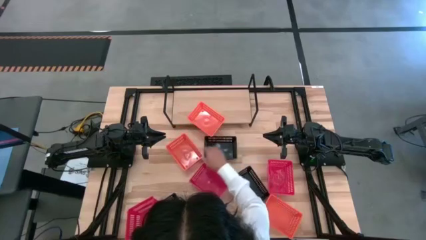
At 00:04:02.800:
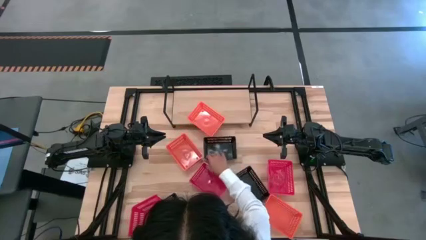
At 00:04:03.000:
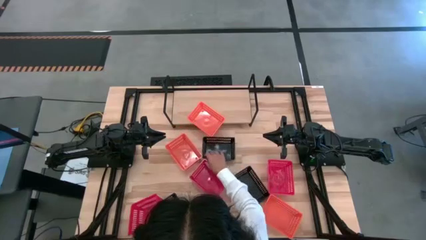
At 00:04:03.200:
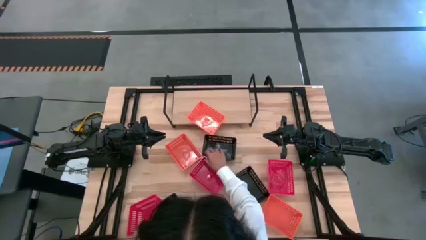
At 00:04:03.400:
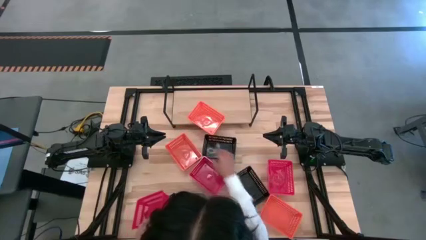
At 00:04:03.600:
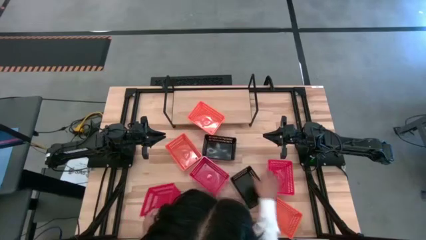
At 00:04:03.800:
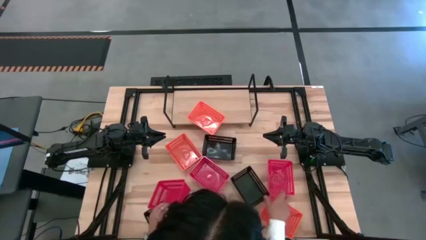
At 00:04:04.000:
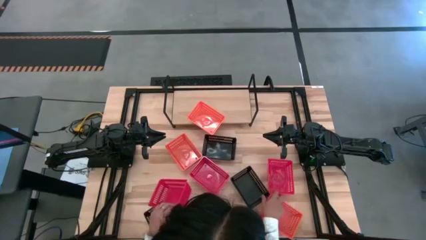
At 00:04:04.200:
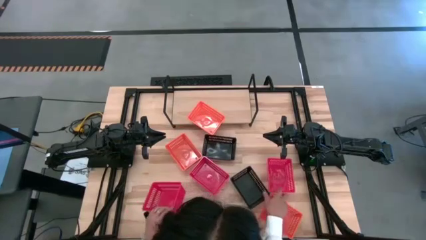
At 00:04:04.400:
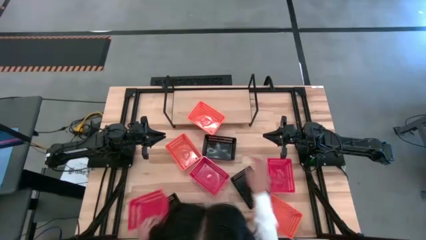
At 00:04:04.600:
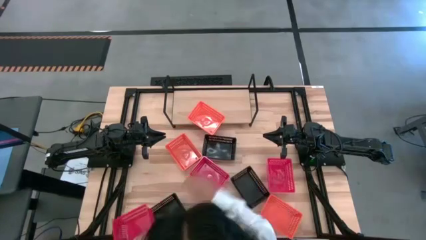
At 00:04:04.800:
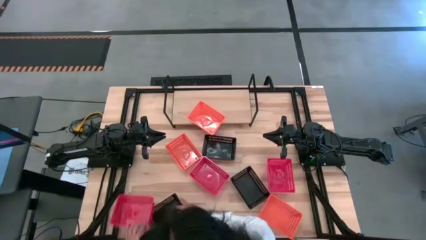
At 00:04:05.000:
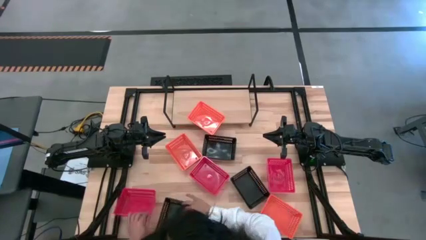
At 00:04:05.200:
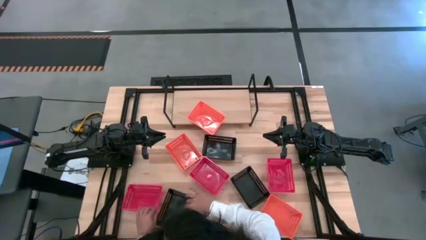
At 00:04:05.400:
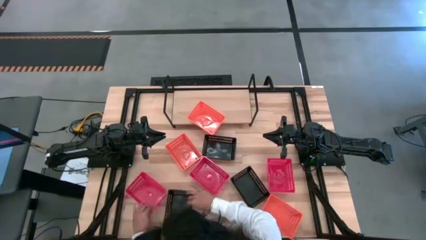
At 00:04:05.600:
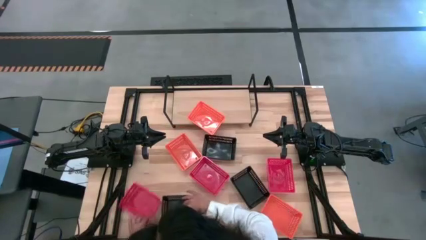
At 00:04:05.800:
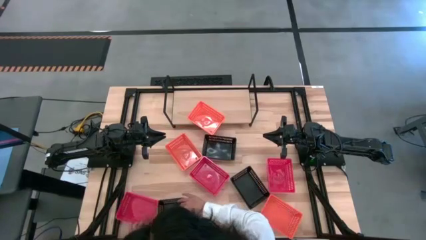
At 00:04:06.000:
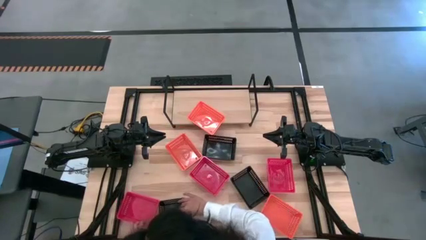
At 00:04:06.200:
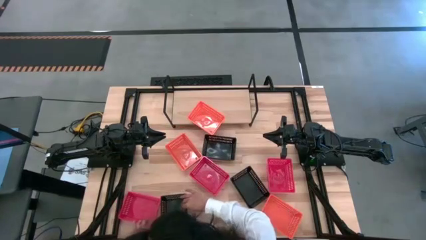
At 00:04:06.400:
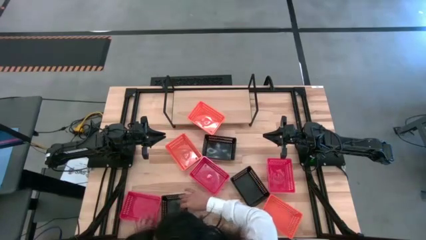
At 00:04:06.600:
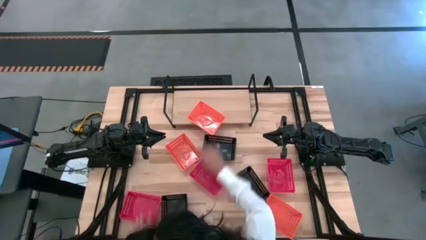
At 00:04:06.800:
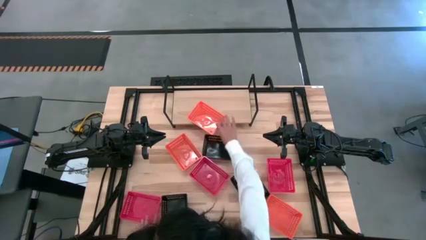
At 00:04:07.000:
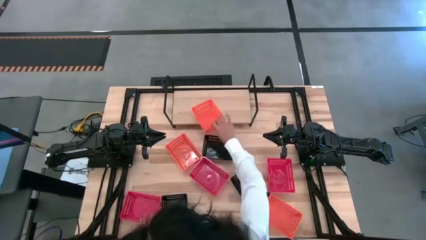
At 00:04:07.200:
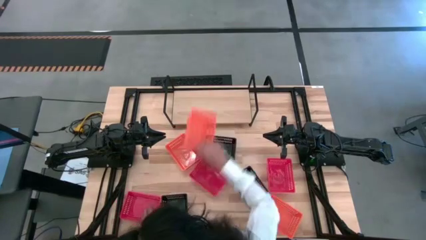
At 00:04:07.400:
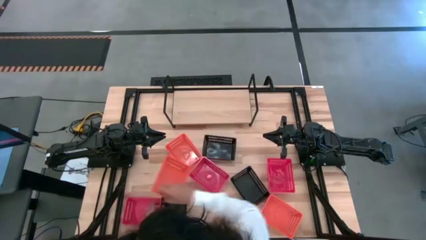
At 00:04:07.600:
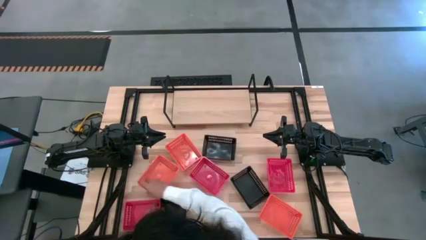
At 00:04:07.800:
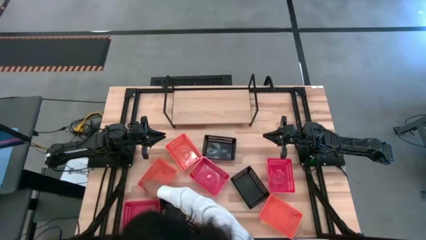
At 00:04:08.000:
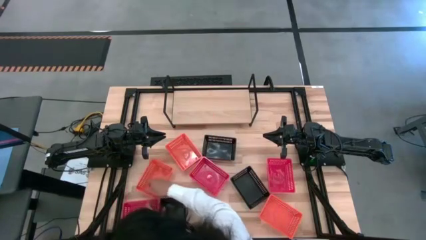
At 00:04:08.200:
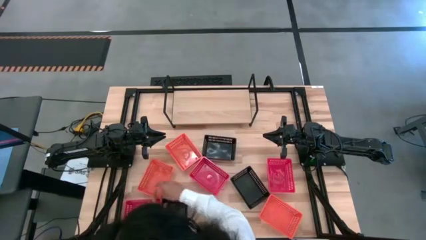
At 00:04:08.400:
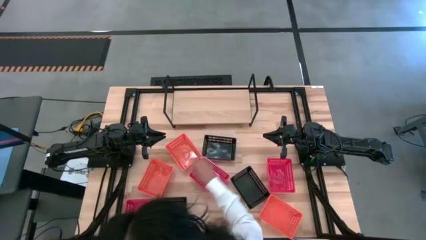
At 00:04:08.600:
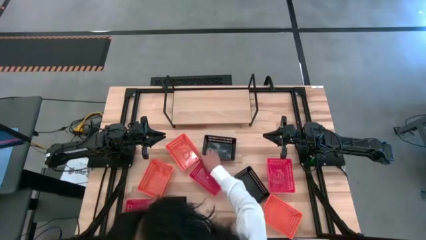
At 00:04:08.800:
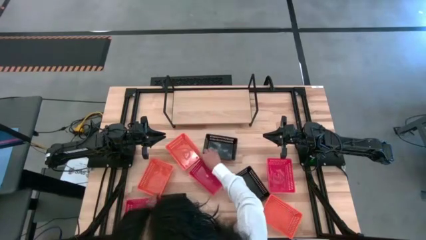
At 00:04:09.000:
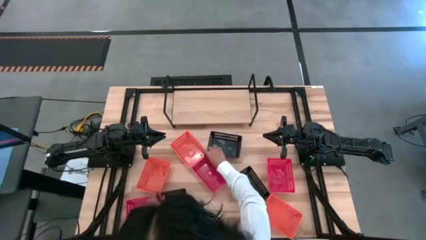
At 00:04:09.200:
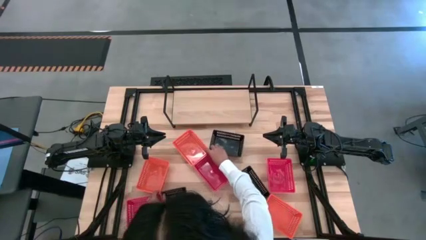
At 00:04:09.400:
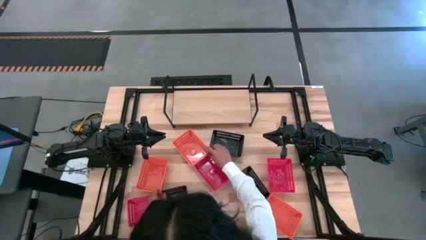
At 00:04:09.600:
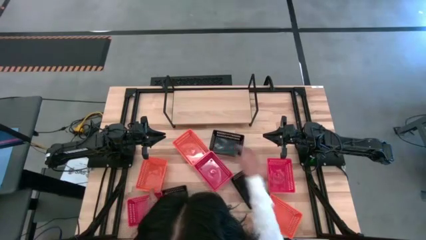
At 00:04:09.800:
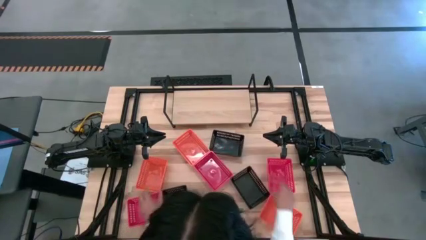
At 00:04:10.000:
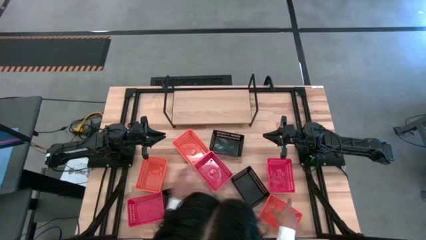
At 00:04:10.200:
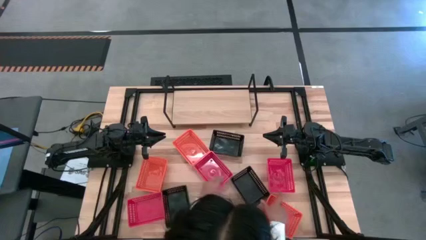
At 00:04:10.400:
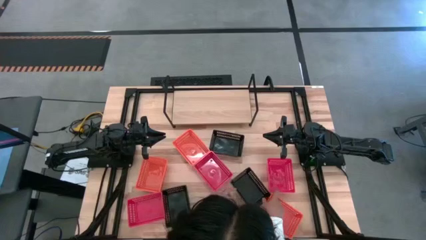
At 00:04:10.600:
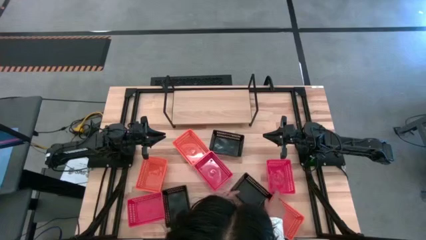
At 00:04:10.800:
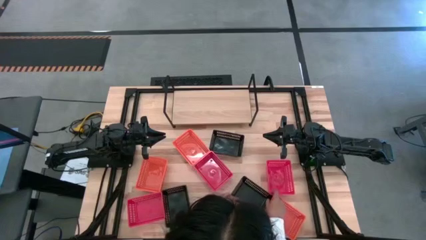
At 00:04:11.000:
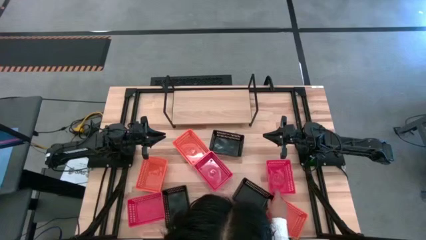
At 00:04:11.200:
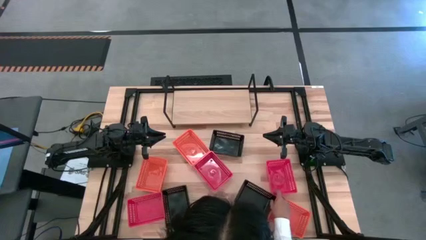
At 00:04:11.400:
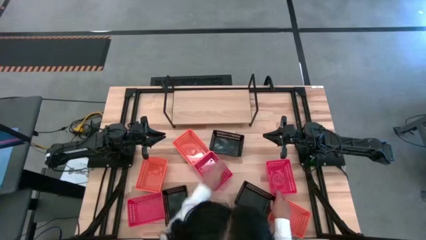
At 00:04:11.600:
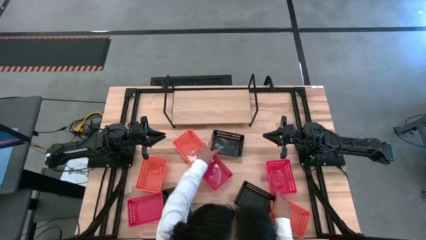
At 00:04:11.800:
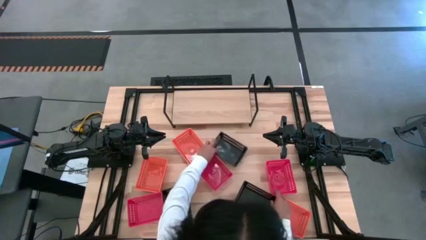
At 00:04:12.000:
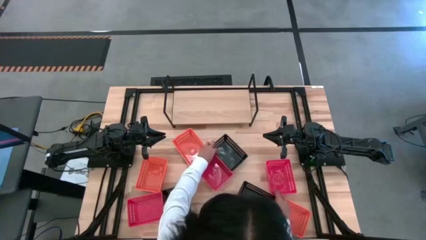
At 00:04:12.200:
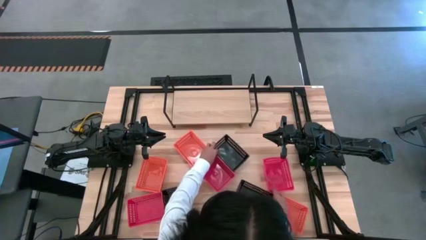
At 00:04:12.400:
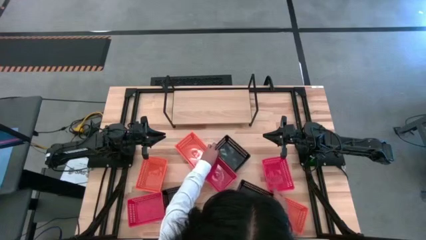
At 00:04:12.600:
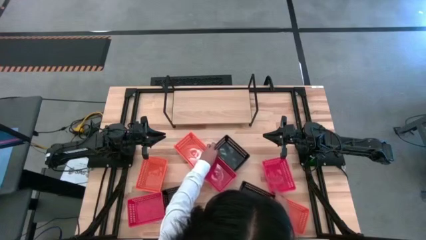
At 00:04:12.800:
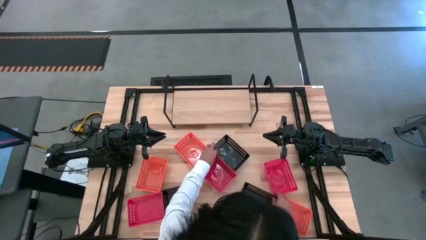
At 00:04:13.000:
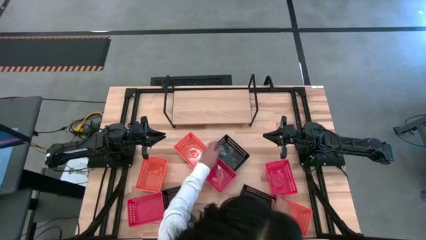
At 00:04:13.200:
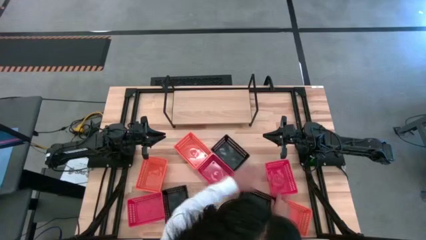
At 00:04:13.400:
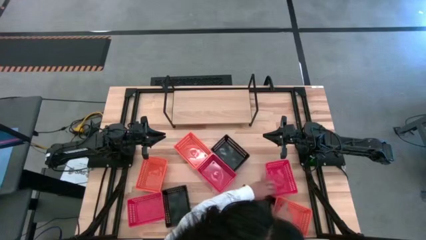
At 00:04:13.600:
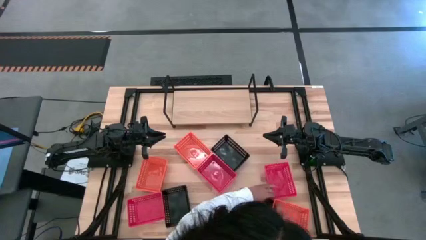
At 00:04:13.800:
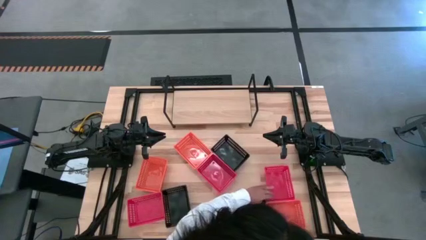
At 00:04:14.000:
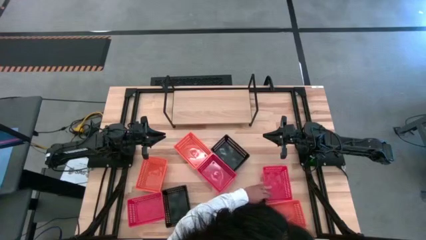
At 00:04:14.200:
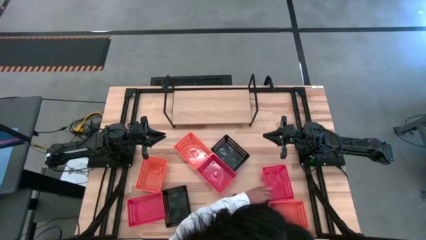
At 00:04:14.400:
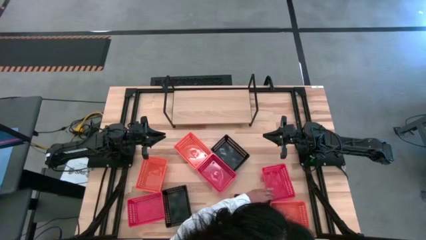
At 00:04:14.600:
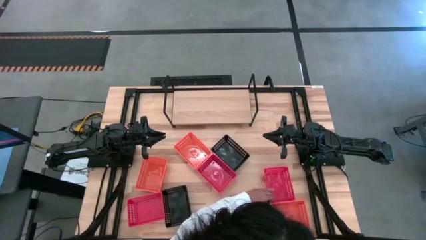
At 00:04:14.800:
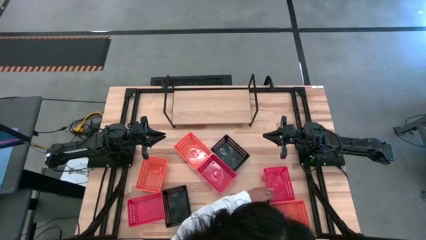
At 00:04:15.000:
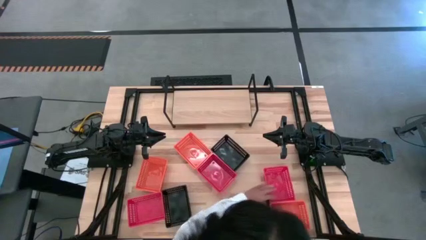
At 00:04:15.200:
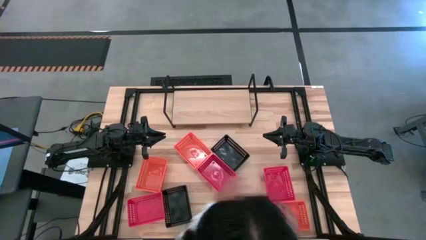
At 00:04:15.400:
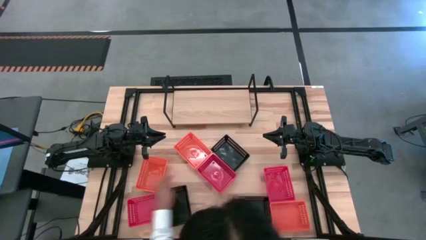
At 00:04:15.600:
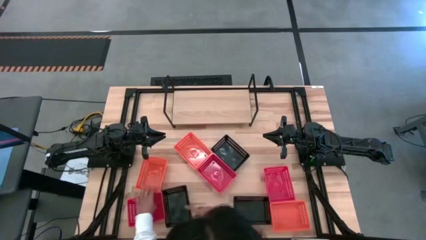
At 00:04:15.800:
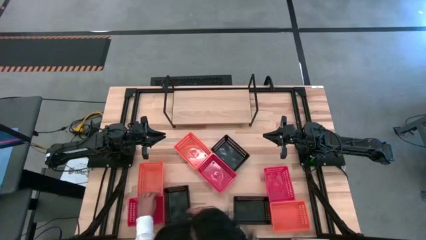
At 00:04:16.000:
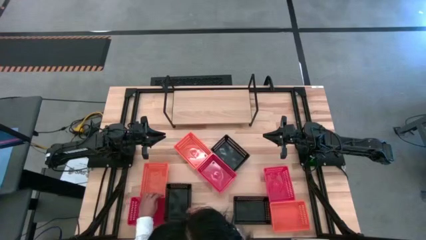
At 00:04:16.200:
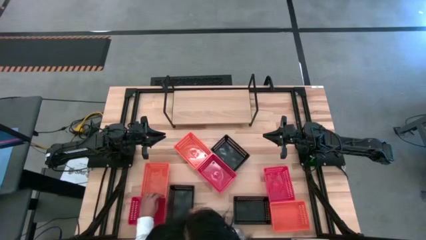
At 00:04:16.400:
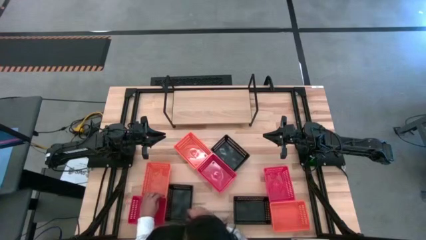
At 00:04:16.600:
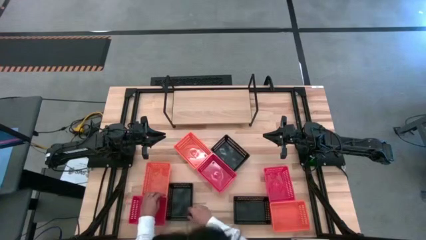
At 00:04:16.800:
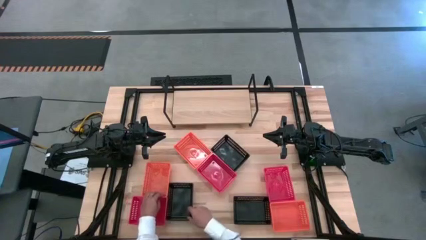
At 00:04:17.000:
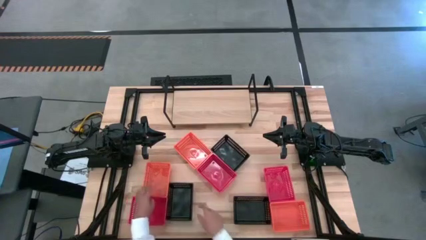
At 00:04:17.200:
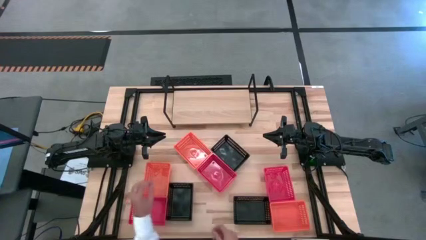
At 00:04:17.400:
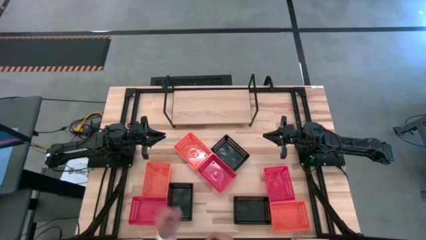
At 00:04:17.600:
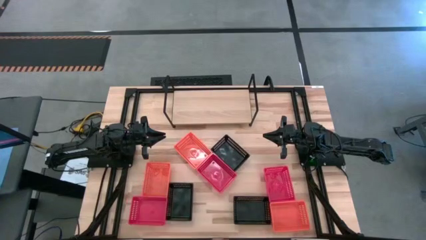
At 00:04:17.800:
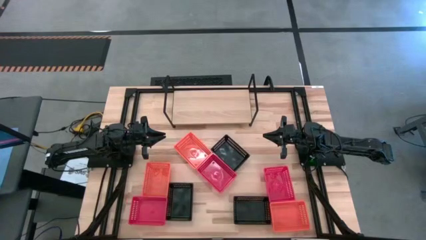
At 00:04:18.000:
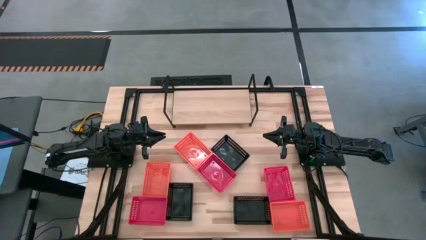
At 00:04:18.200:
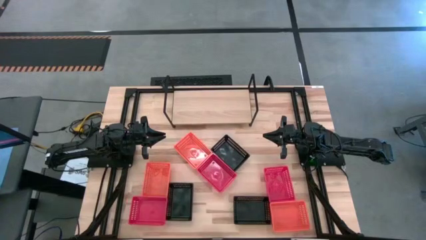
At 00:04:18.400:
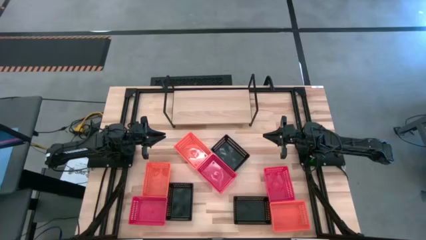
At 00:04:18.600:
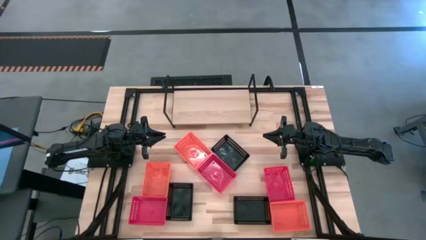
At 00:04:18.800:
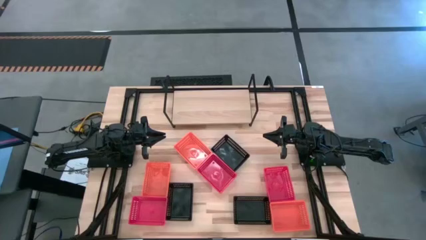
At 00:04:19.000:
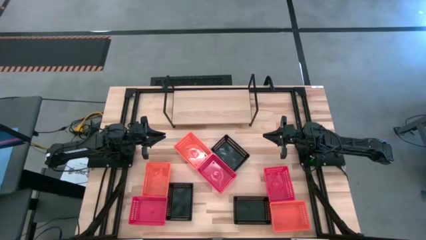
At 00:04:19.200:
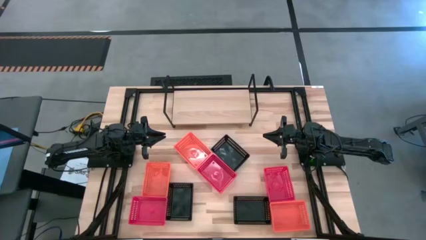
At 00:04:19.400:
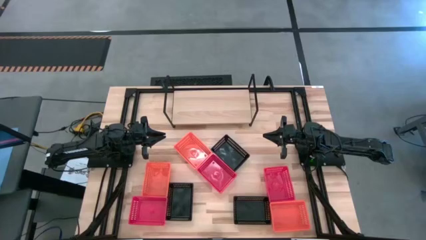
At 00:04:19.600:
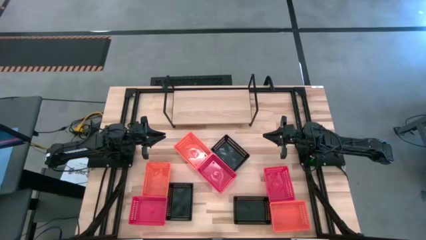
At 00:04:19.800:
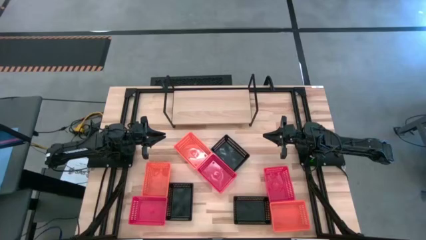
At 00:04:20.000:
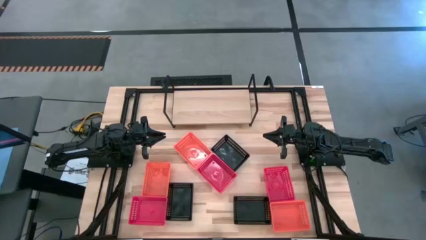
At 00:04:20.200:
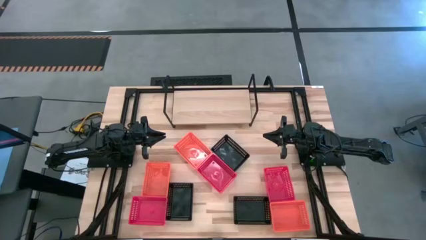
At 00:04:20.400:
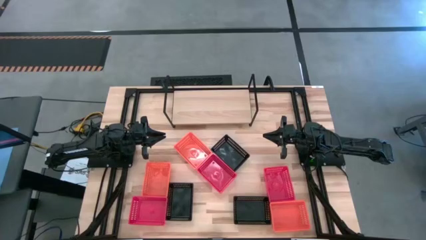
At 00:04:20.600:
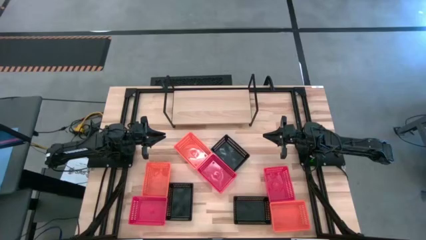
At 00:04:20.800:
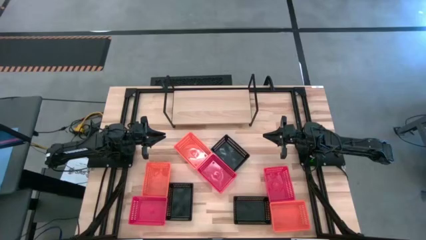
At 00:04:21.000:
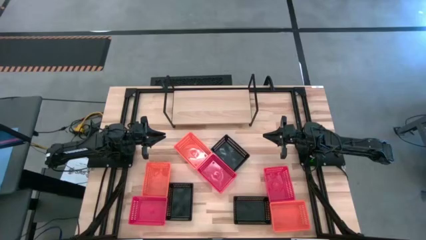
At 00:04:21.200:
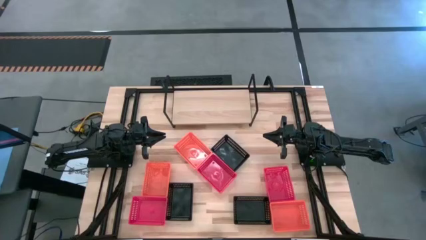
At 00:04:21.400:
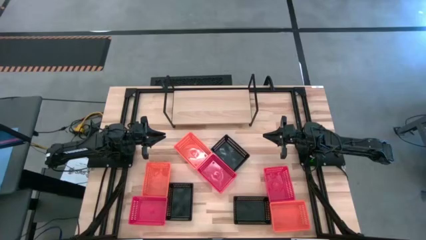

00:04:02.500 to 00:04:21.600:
Task: Stack baskets on shelf by color
Return to Home Position
